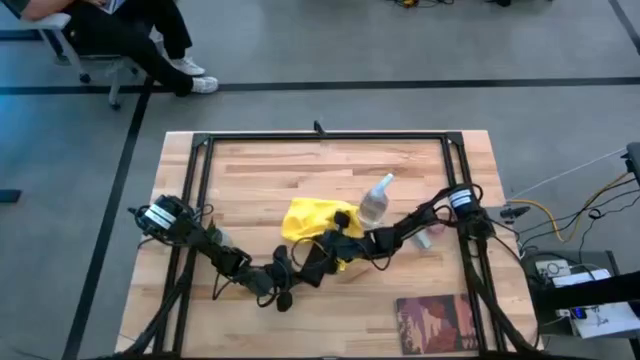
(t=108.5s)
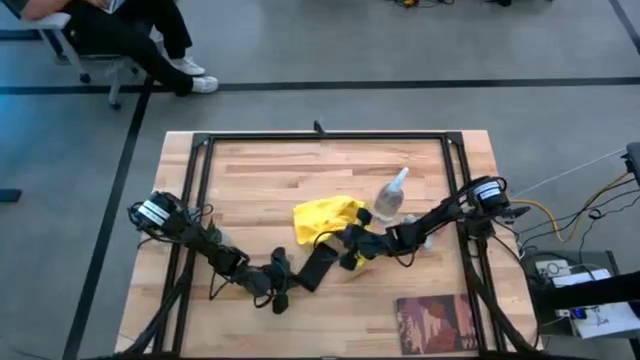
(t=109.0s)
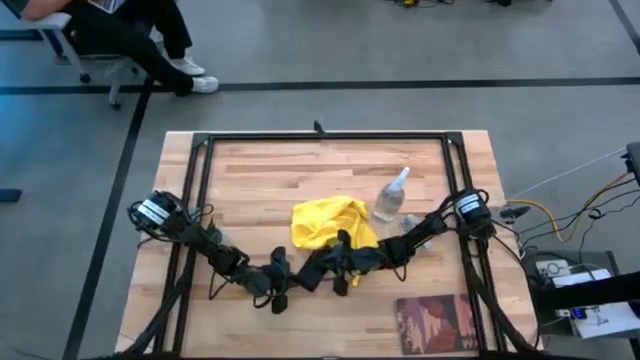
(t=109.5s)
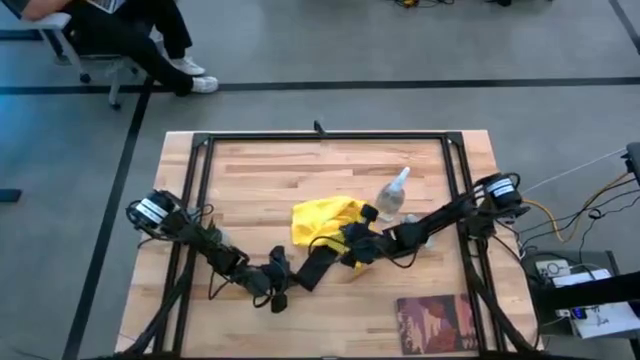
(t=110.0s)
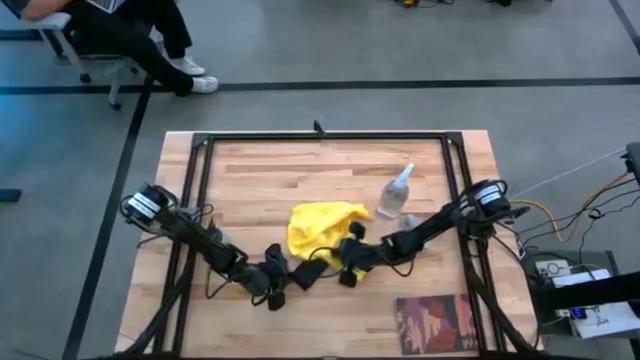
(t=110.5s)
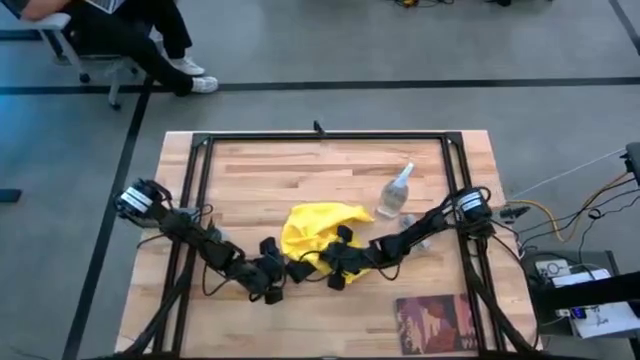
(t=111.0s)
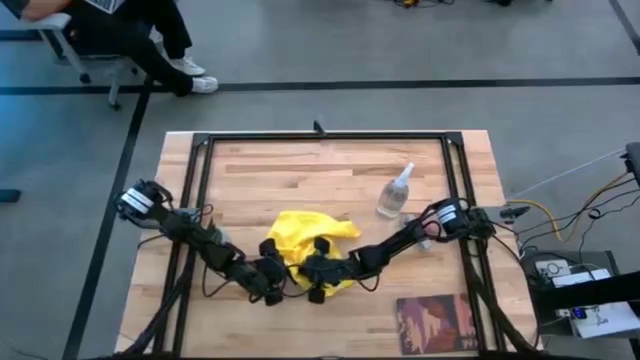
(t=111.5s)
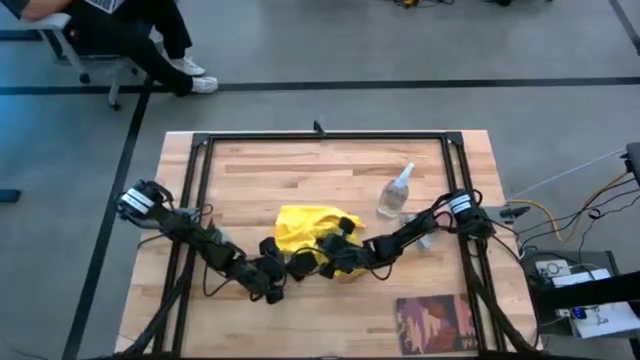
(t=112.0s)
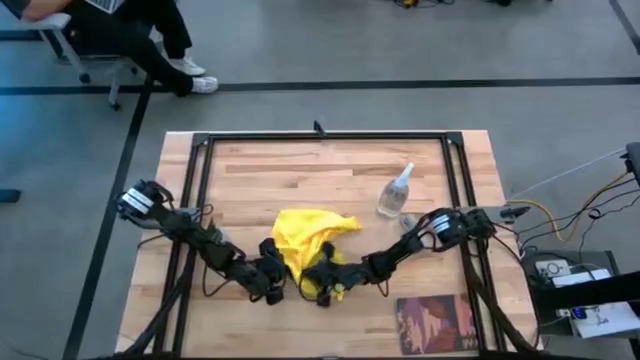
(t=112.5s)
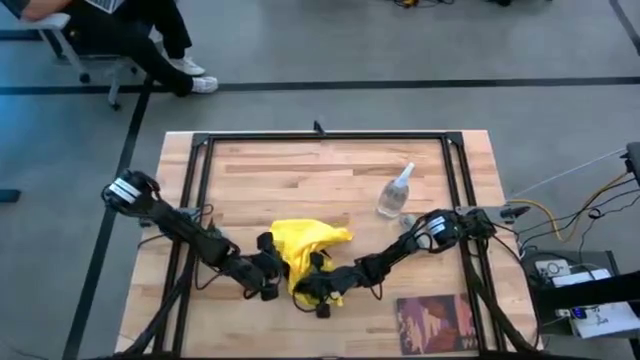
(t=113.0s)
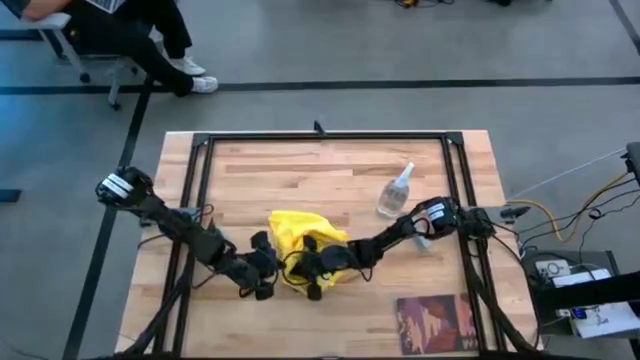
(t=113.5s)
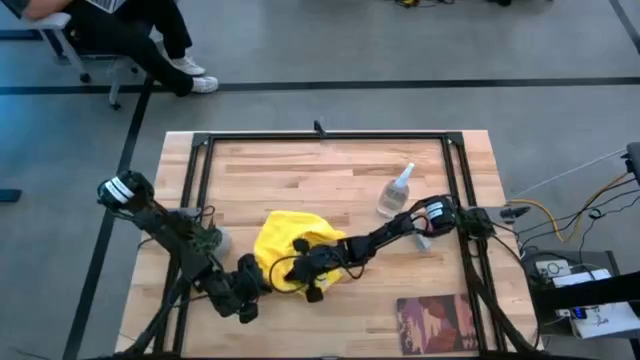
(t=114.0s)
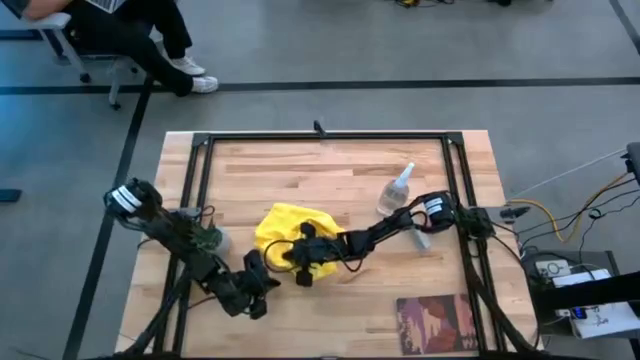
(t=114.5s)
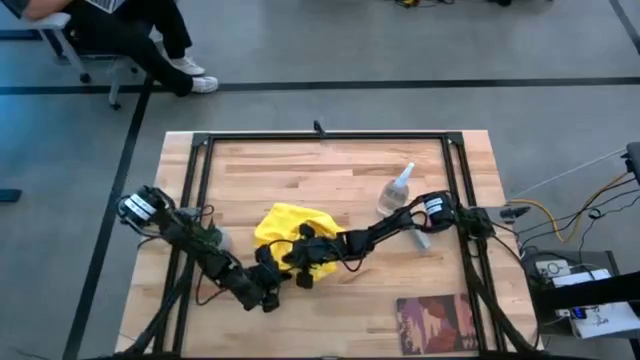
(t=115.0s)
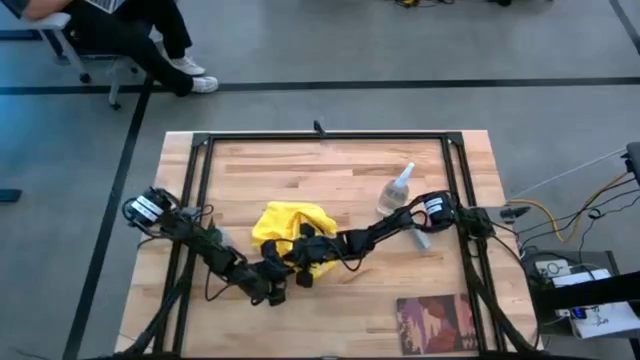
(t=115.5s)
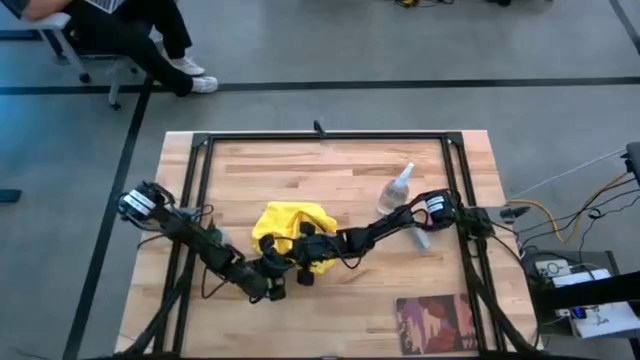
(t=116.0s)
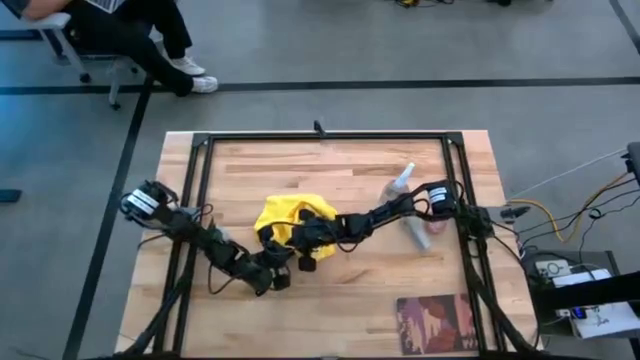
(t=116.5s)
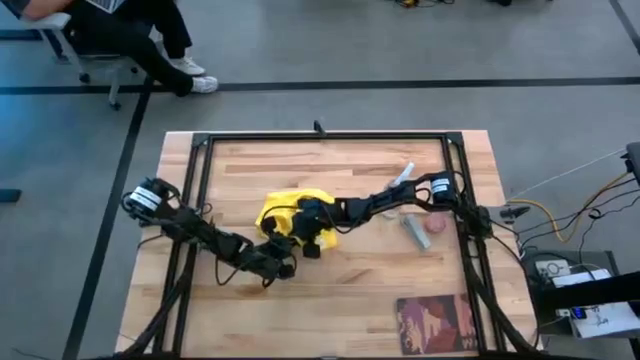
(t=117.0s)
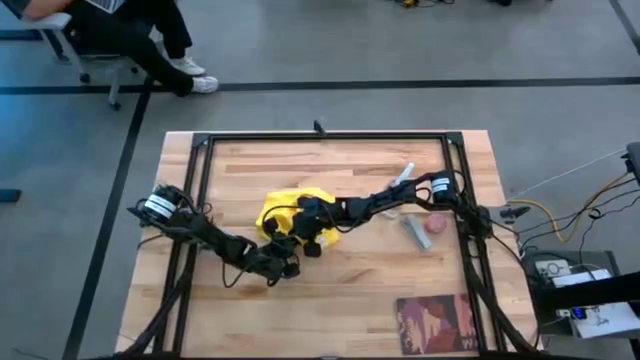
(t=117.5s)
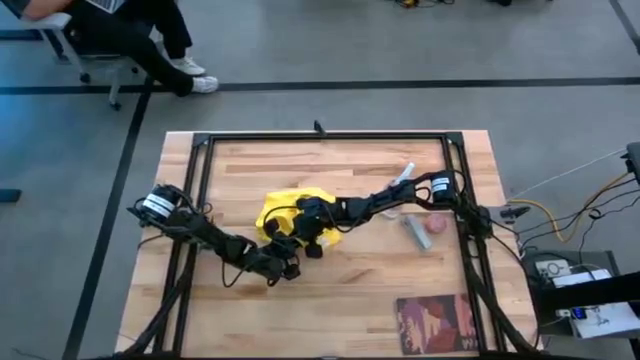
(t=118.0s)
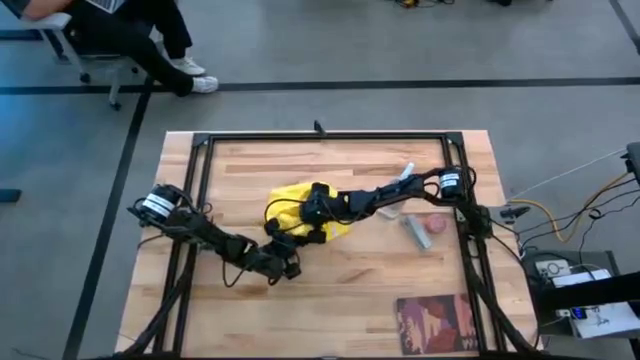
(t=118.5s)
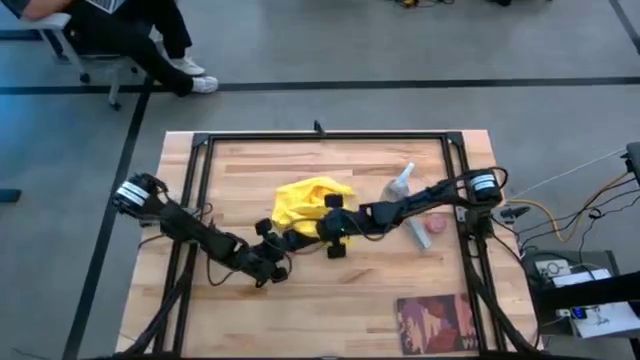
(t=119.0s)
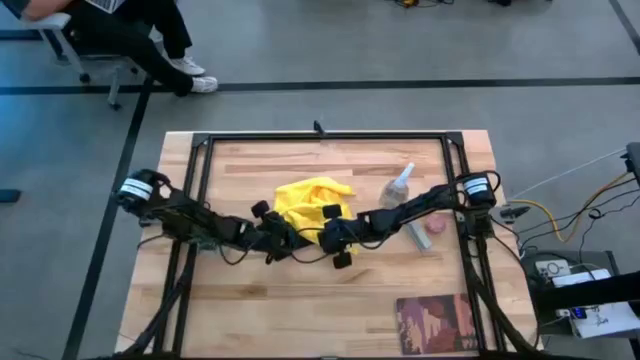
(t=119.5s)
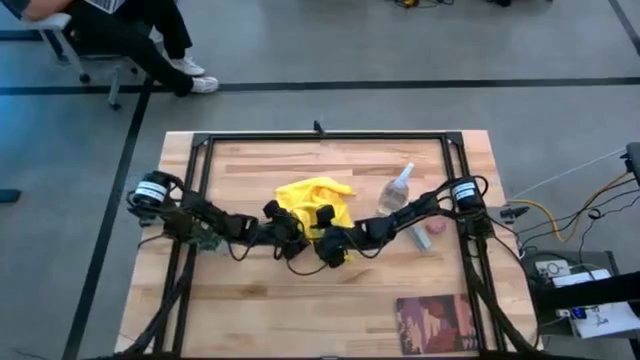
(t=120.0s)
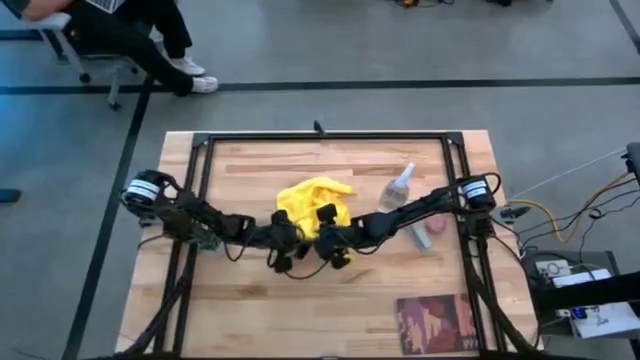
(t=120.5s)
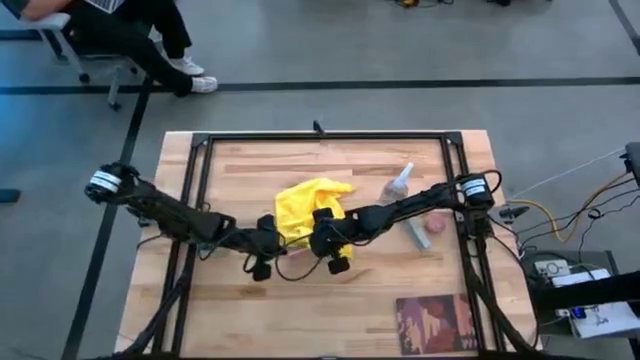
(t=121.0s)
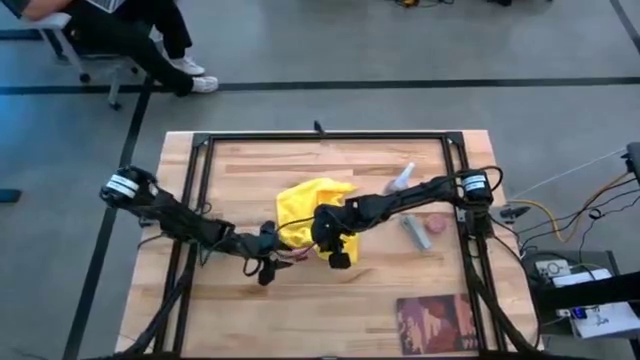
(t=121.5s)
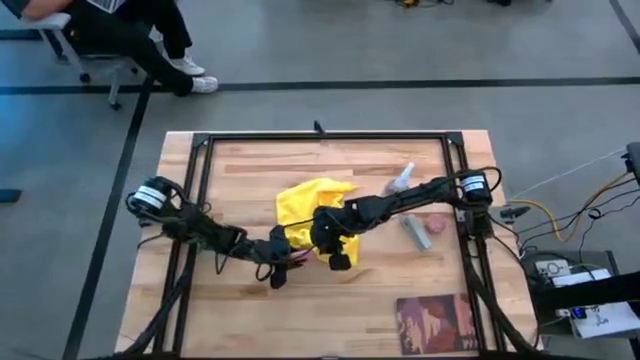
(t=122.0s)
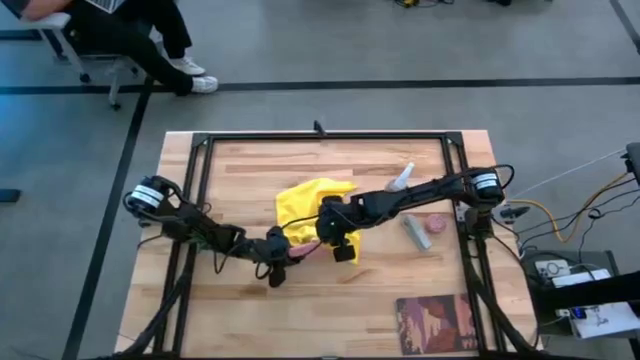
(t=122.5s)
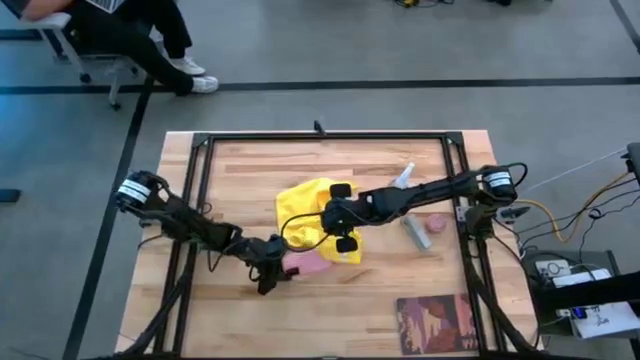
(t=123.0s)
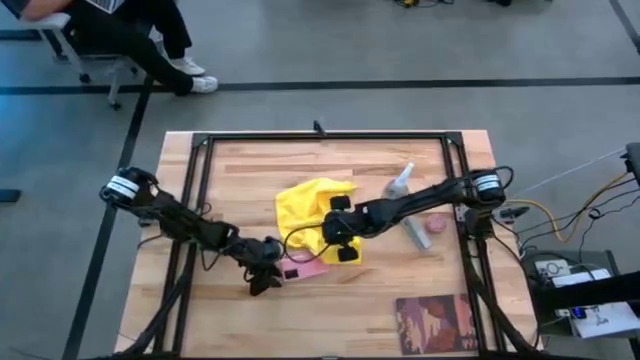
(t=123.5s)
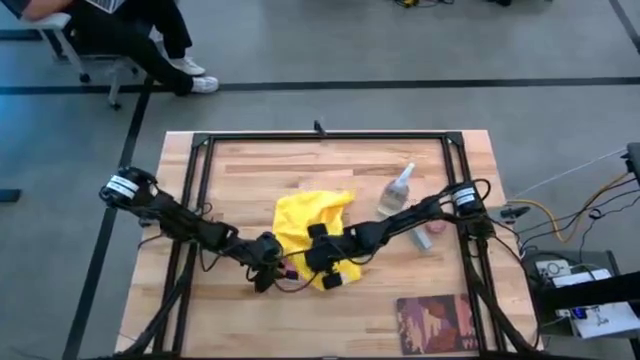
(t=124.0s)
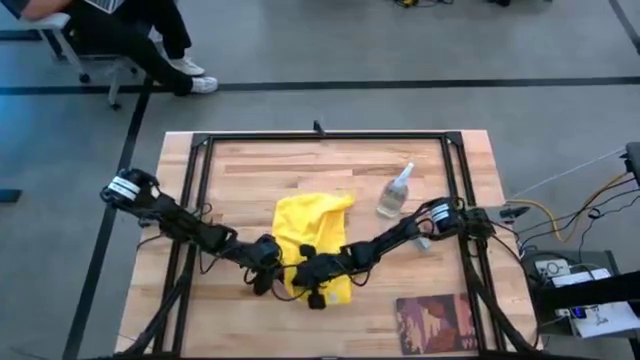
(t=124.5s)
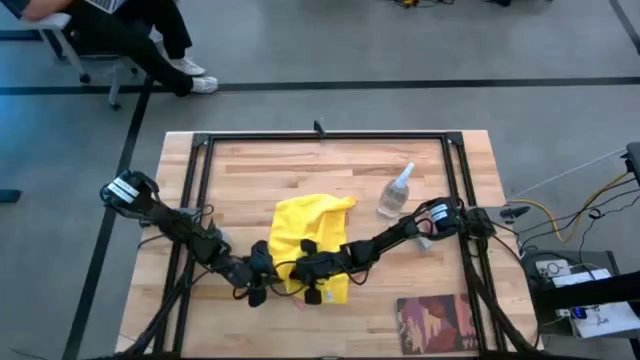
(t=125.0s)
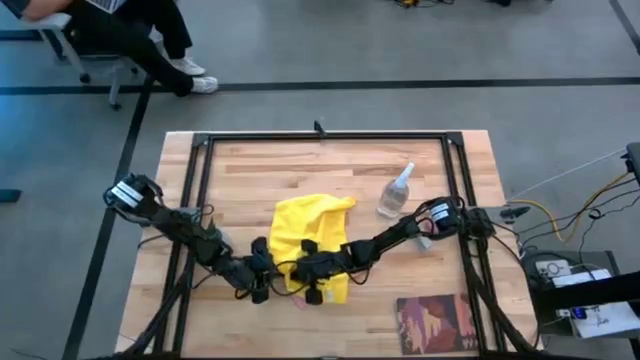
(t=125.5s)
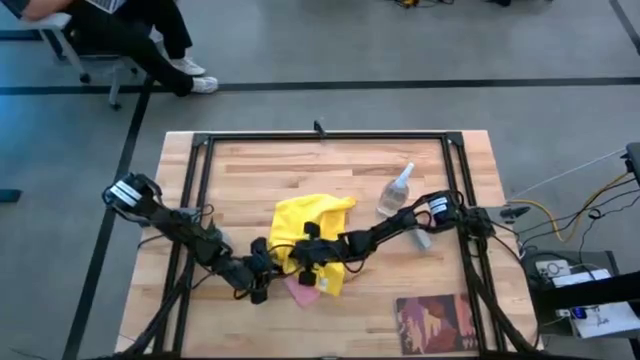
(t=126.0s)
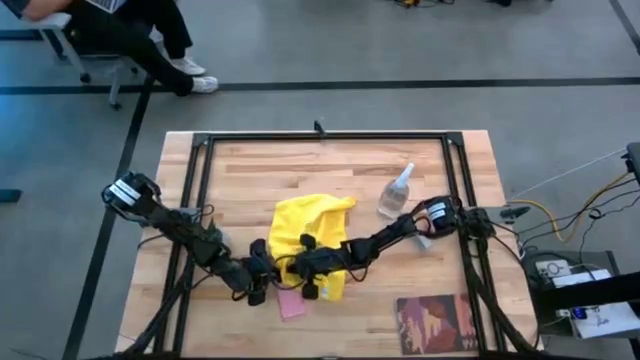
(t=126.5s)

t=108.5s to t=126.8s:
Task: Apply microfiber cloth
Wipe the front and back of the cellphone with the yellow microfiber cloth
